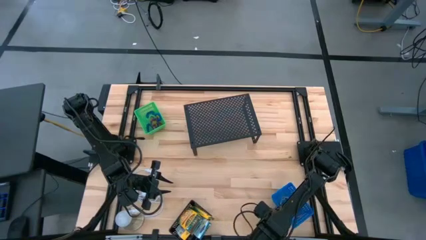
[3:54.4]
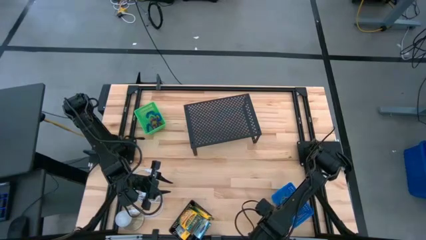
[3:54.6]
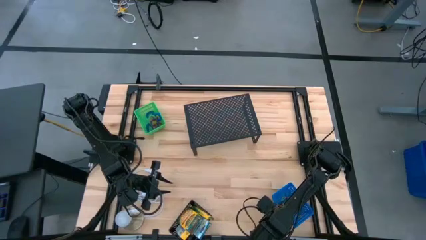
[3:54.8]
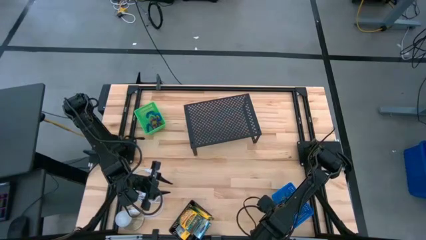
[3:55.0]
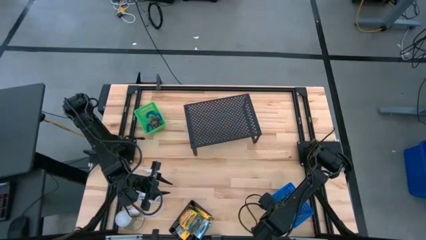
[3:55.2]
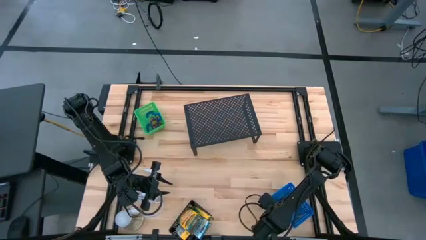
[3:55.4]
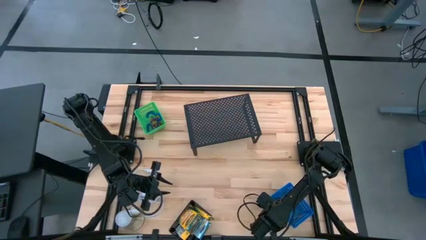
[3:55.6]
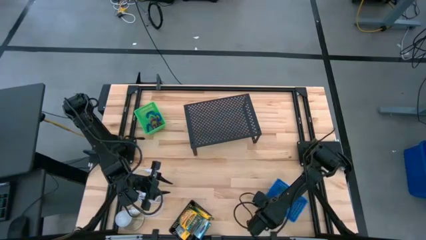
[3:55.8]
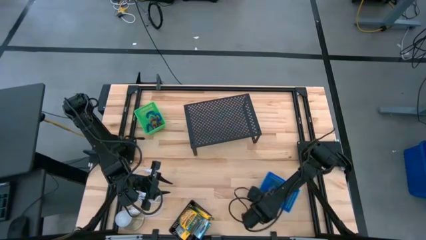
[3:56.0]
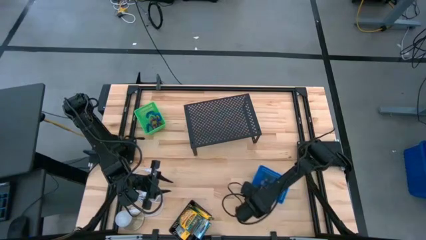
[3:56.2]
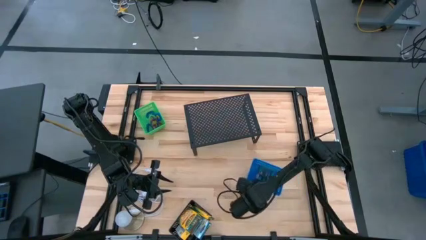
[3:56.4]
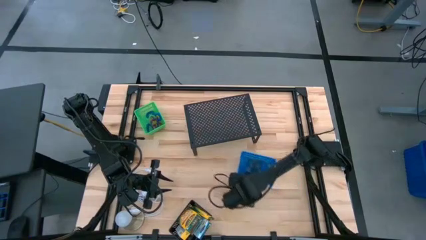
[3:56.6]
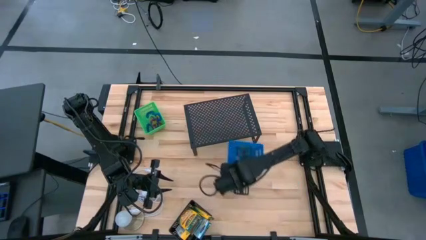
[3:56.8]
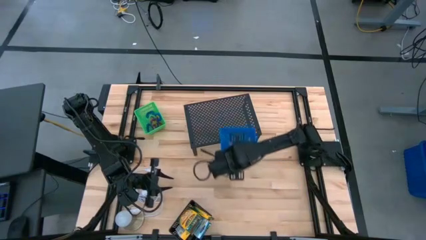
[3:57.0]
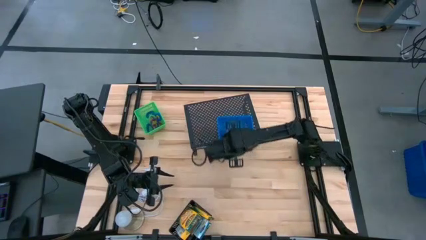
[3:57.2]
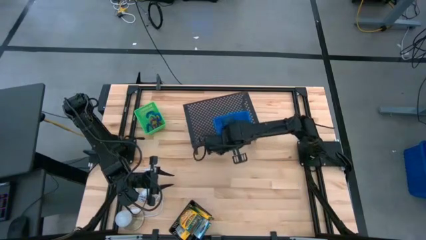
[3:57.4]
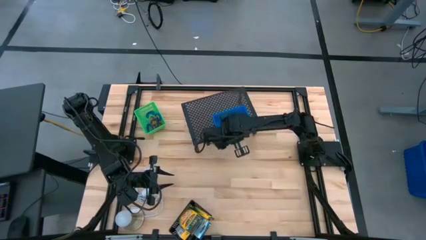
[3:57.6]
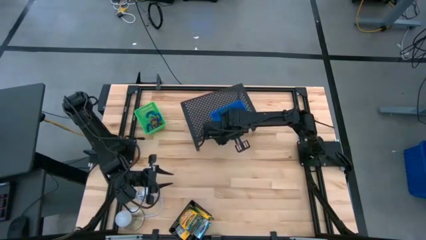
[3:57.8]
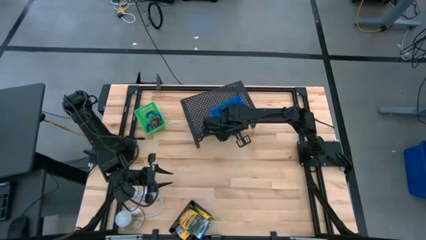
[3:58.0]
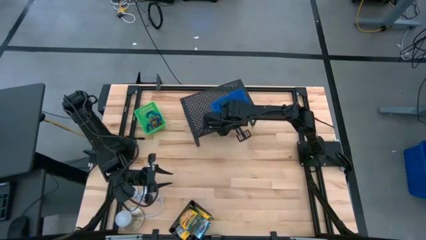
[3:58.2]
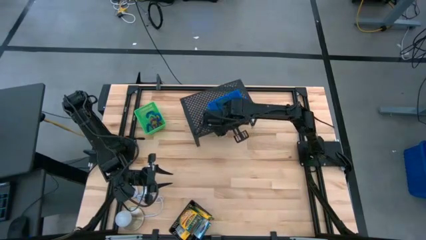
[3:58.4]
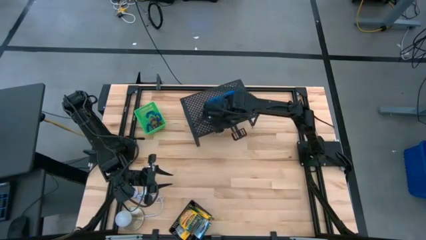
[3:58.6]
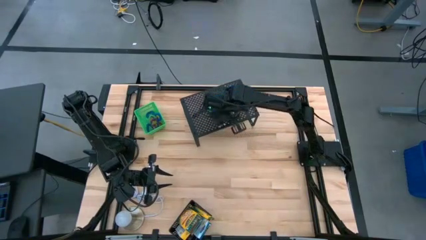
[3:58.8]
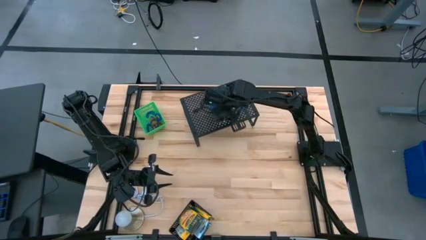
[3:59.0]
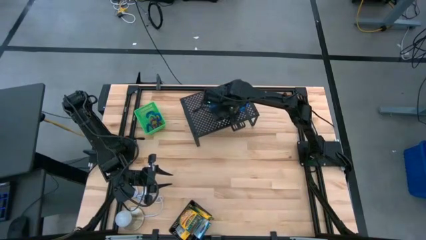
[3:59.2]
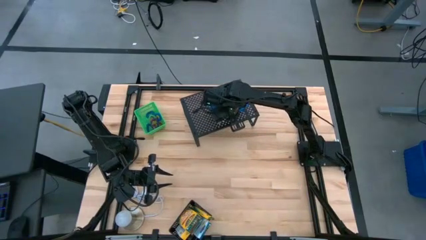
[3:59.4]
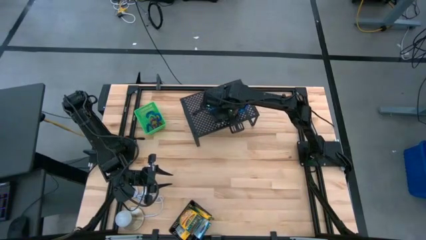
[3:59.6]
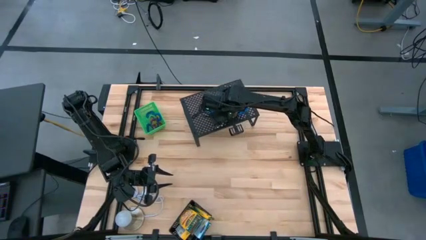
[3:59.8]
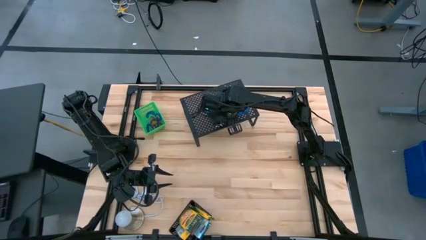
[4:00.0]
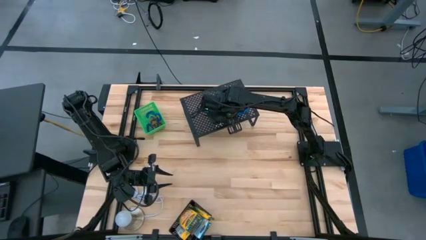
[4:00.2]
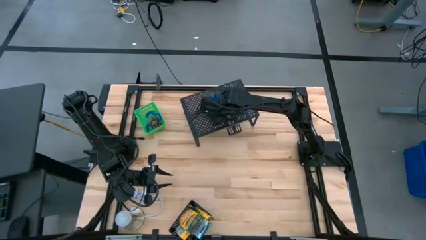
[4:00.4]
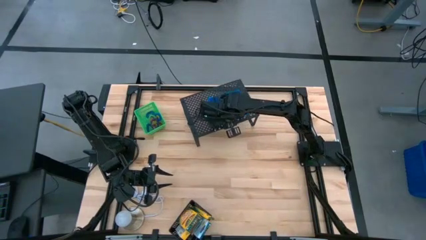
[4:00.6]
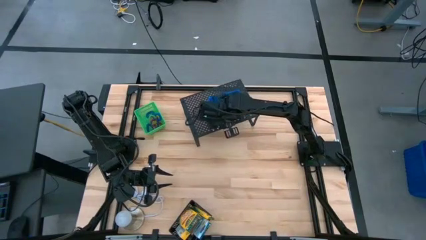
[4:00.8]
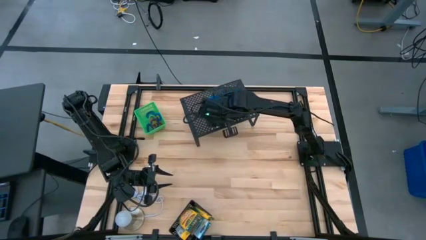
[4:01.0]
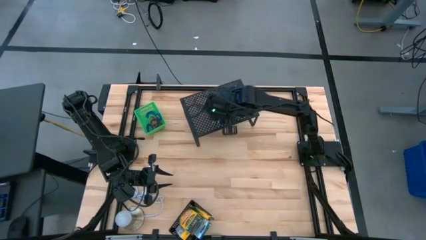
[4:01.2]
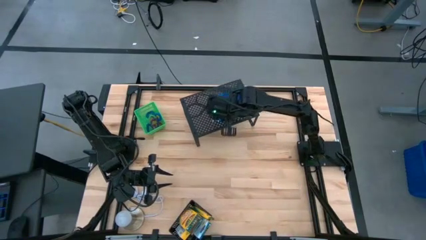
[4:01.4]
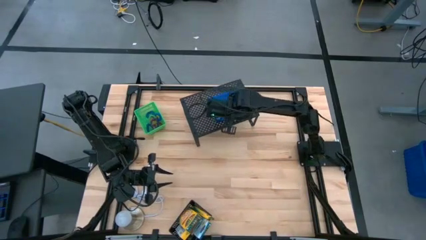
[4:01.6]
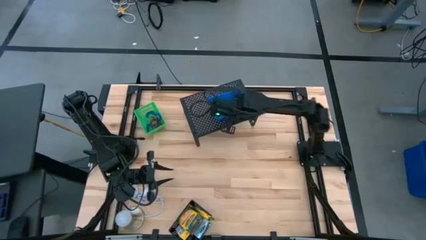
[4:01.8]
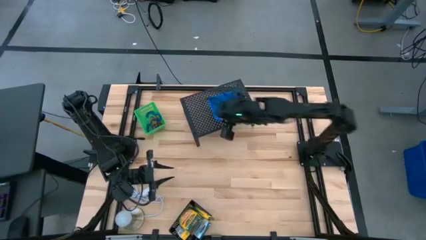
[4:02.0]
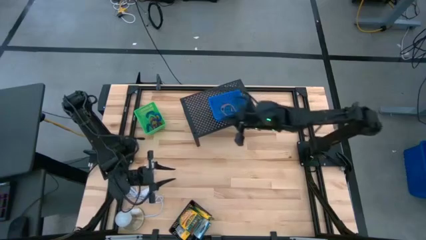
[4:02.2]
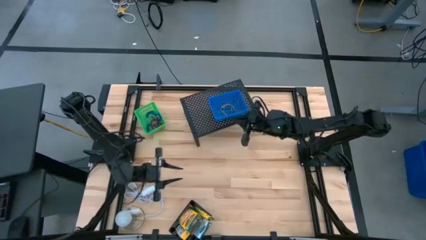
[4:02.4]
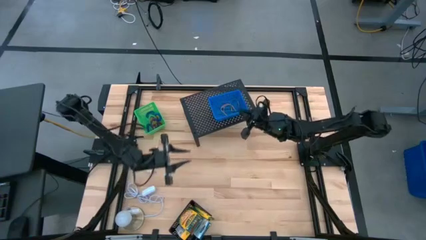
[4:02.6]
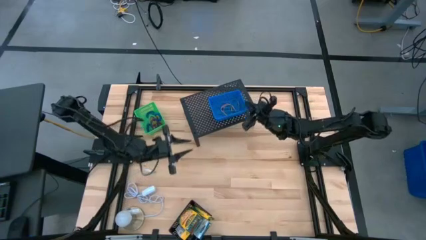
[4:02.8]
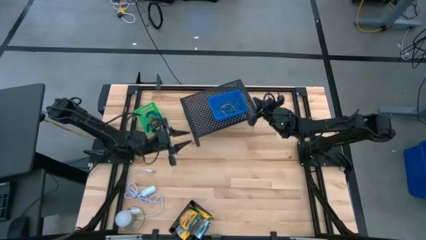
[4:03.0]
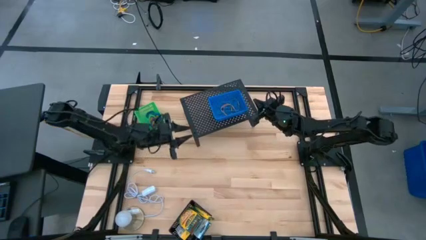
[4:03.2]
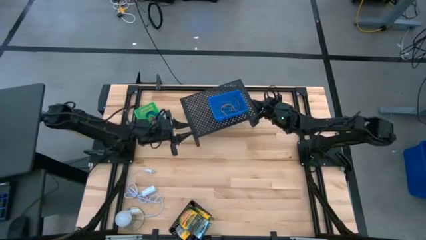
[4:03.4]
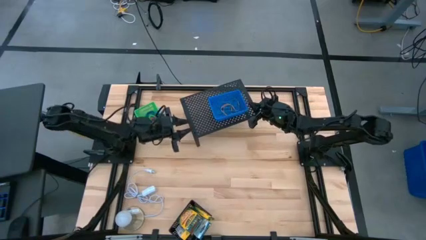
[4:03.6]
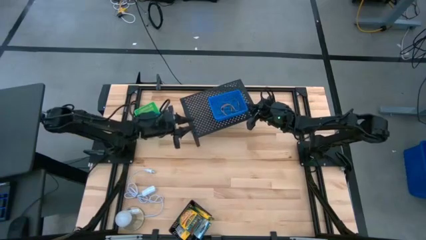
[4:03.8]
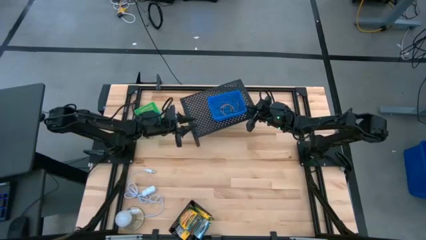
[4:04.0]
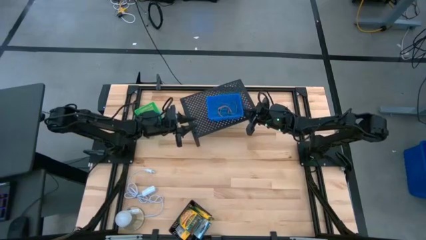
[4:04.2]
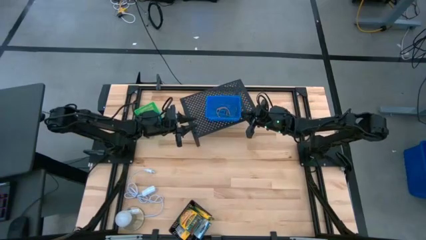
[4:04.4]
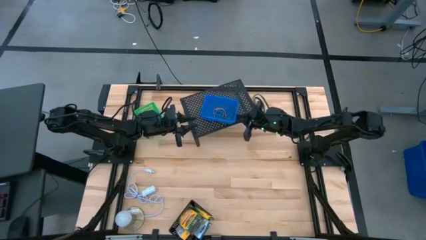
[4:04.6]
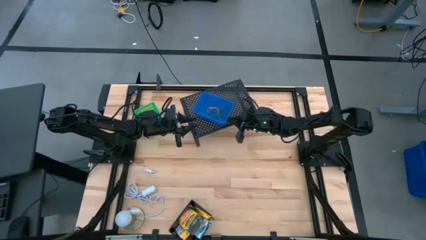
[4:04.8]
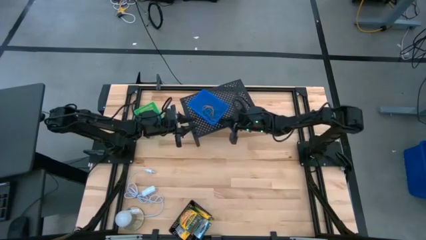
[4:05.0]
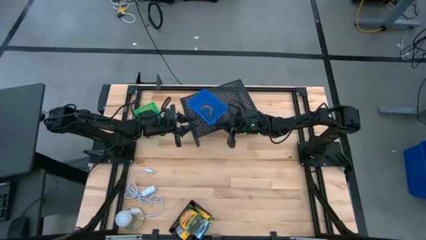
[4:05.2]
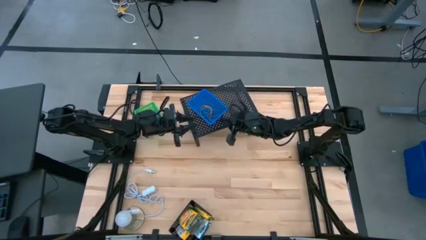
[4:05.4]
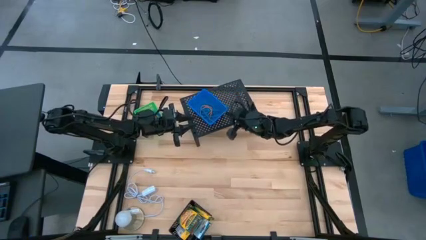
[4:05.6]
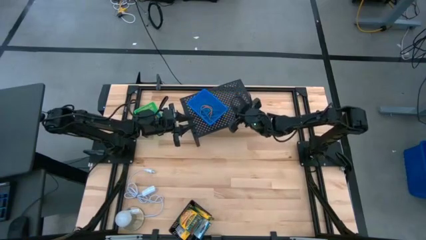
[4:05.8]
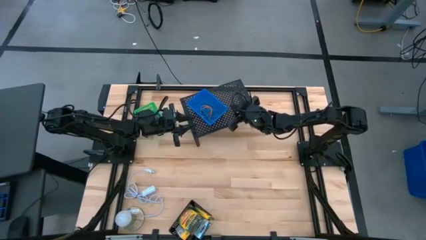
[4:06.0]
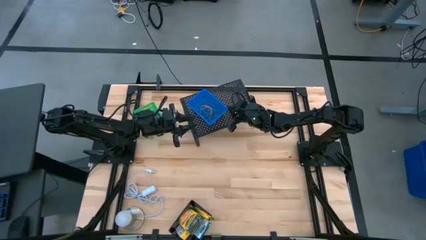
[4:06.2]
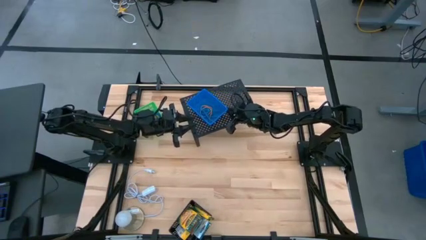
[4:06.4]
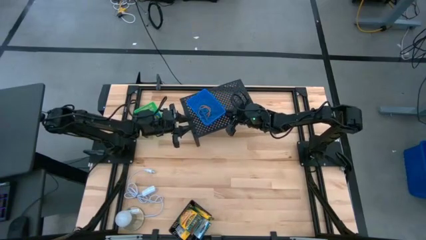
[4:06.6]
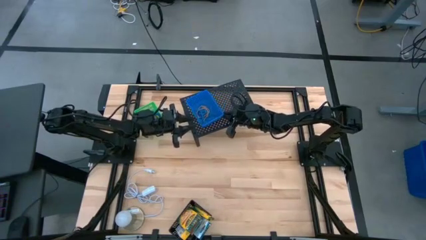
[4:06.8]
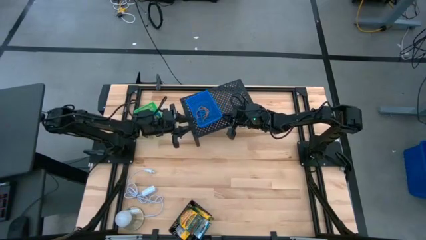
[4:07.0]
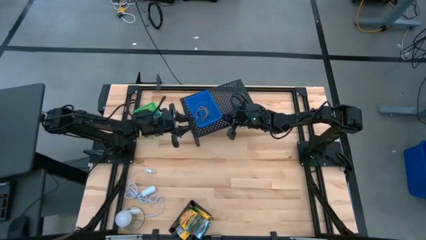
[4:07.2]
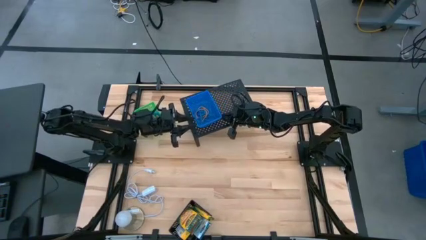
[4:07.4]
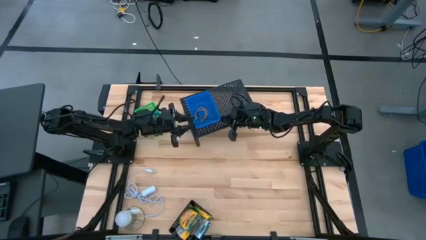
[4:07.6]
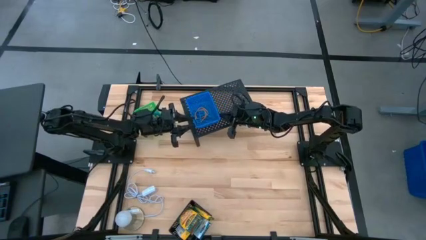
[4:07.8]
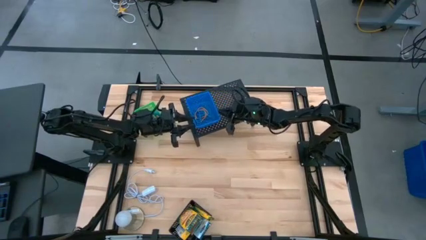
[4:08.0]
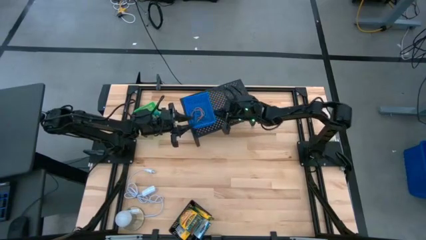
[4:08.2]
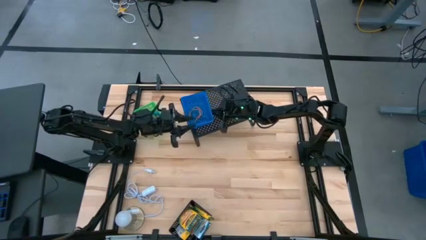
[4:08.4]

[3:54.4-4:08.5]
Task: Pick & Place Office Desk Supplies
Put the blue bin on the shelf

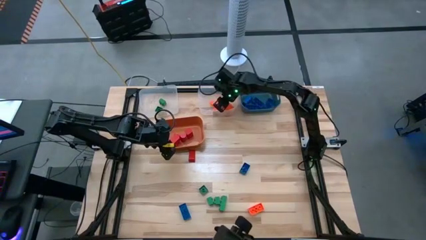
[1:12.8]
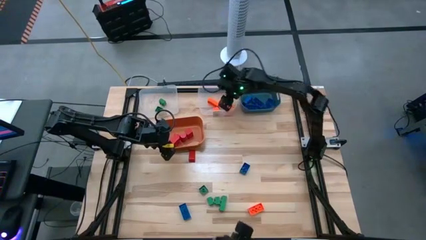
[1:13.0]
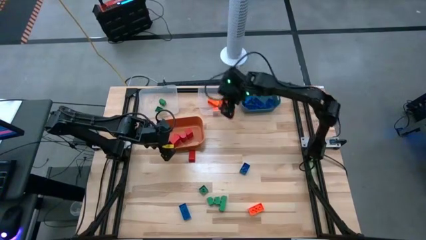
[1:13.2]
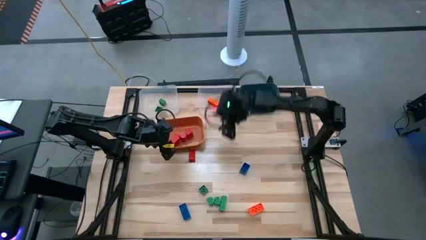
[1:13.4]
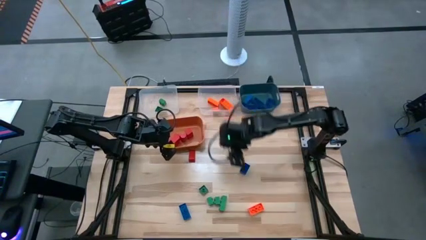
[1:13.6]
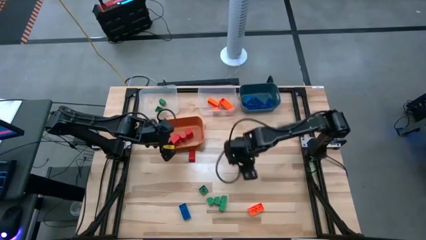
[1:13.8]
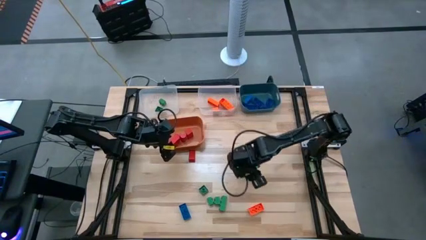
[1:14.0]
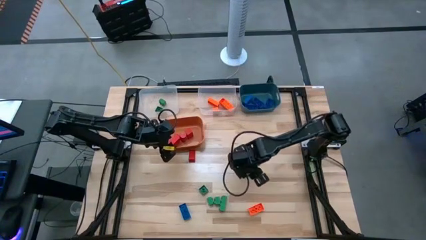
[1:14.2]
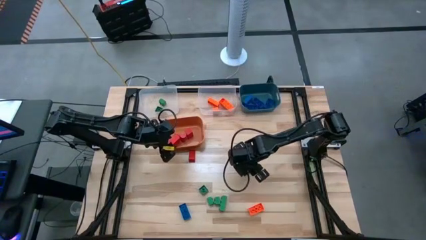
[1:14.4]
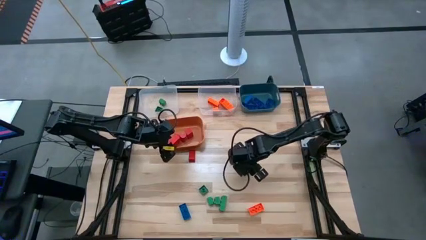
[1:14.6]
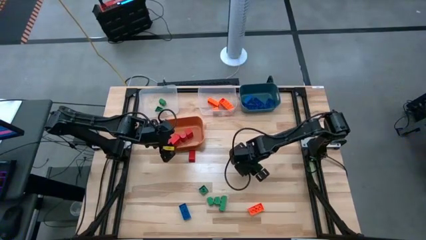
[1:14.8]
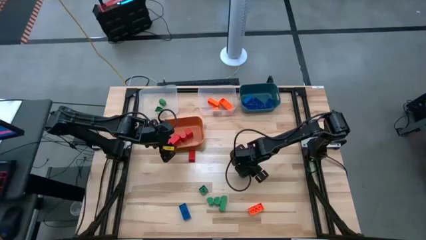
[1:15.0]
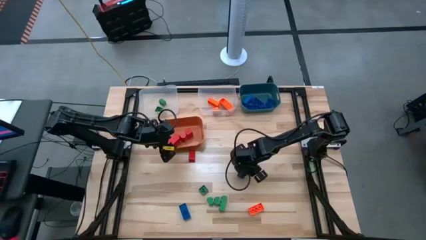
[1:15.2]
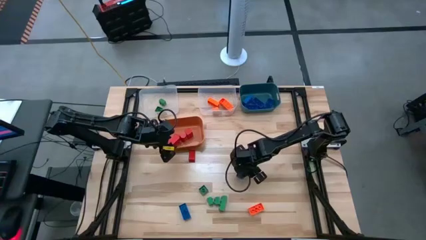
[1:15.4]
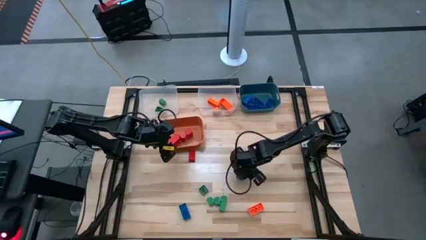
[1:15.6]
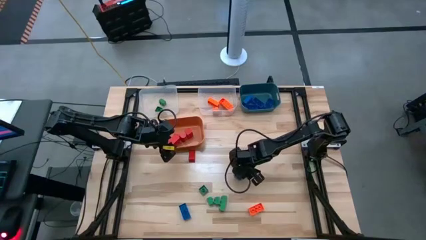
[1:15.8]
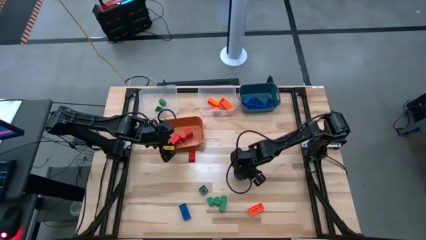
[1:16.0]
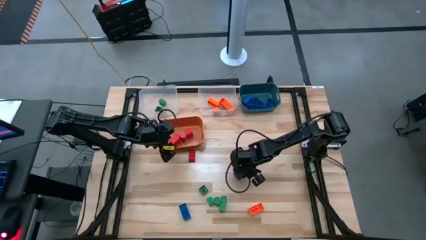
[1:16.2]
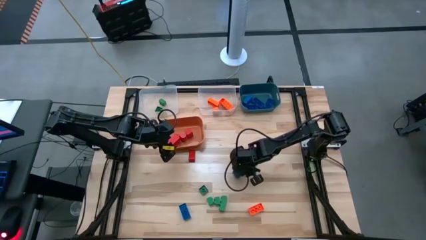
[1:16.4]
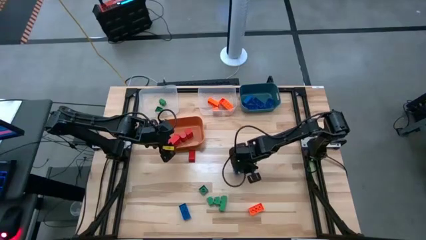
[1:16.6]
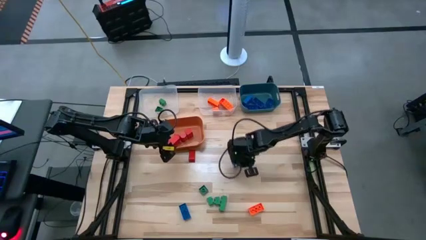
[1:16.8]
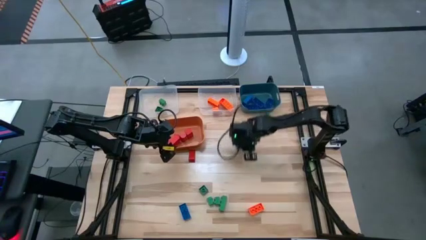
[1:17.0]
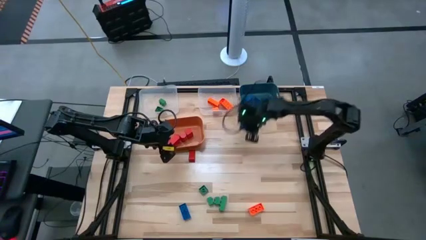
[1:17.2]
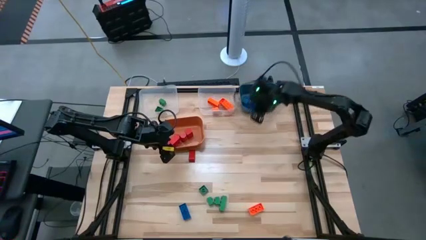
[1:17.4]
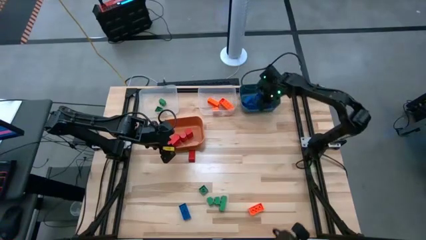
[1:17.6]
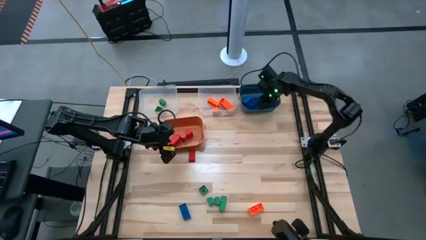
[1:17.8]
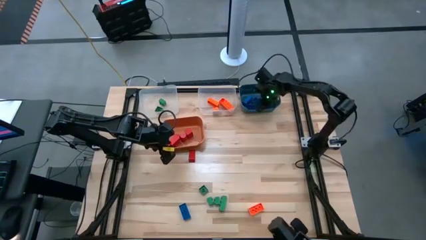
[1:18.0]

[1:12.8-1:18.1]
Task: Sort blocks
Put the blue game piece into the blue bin
